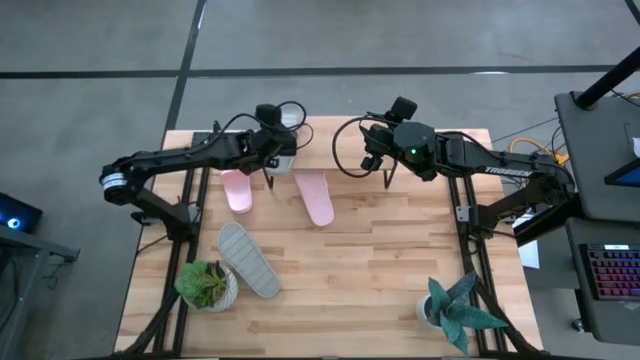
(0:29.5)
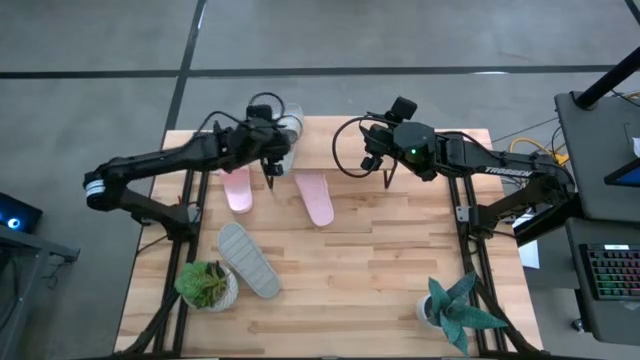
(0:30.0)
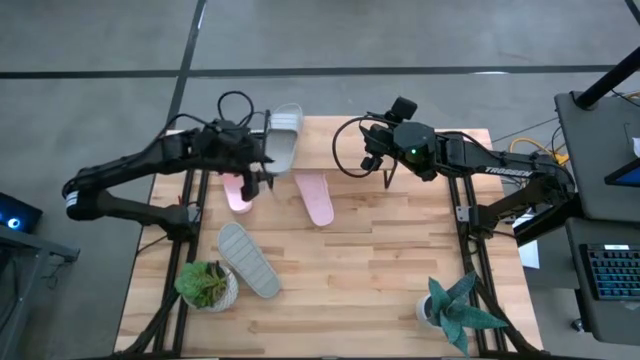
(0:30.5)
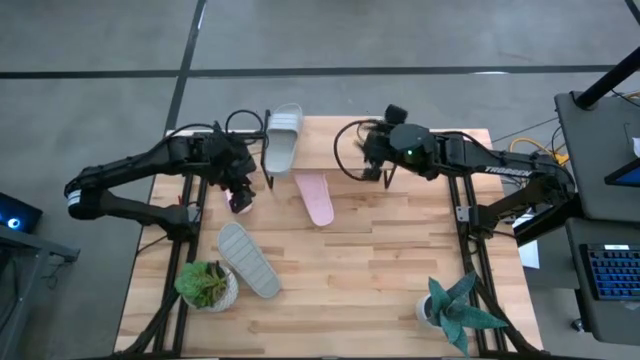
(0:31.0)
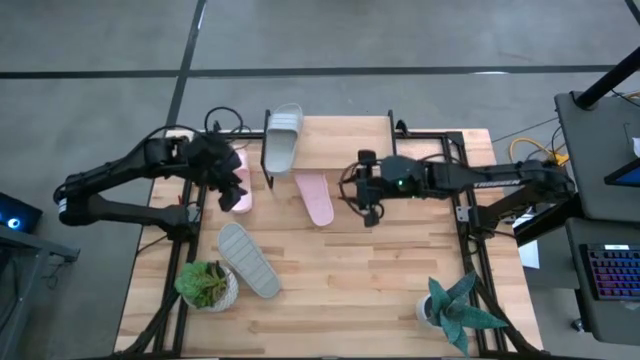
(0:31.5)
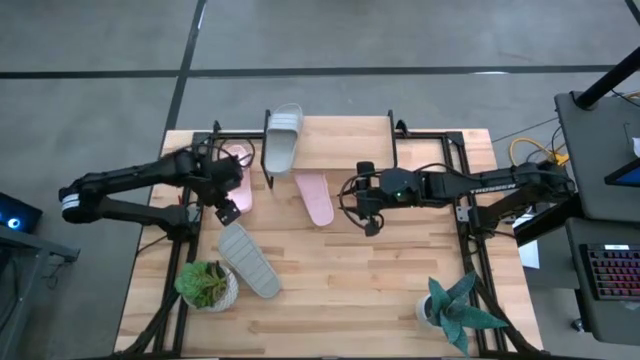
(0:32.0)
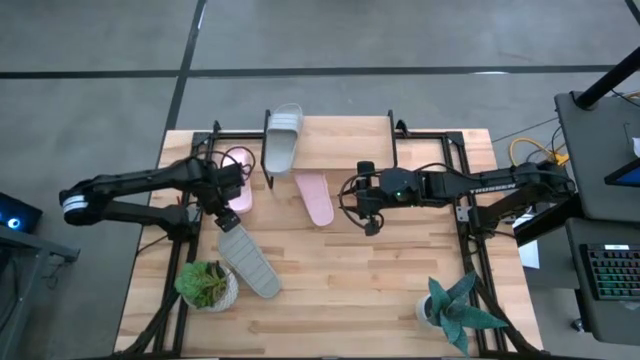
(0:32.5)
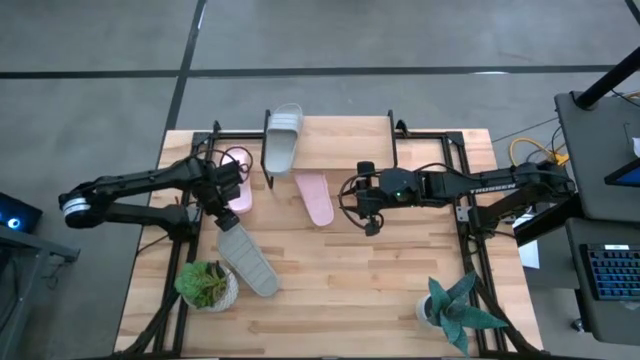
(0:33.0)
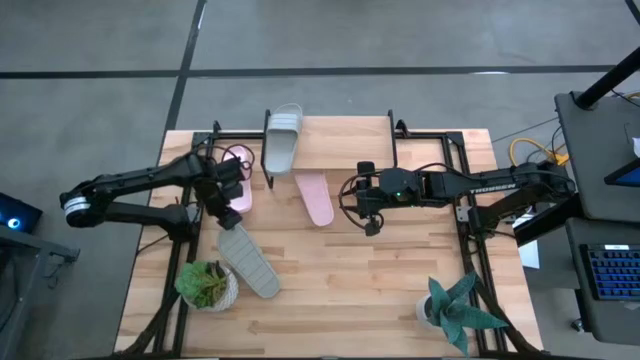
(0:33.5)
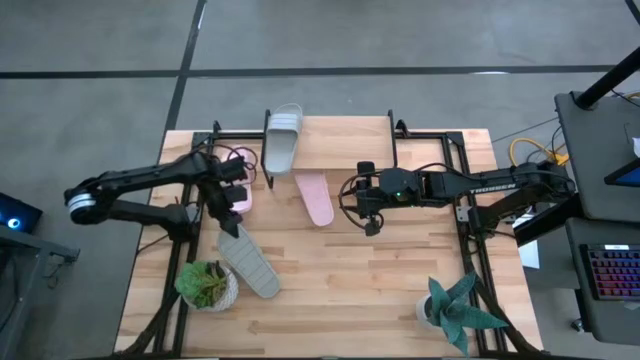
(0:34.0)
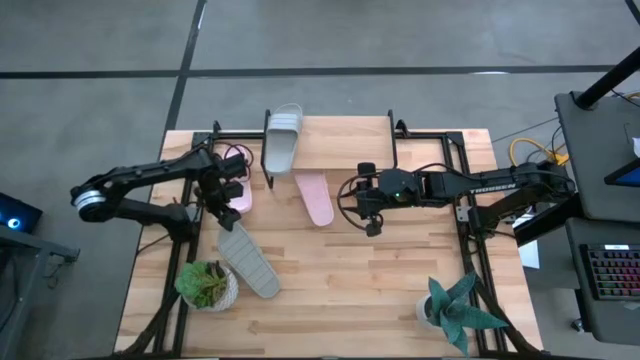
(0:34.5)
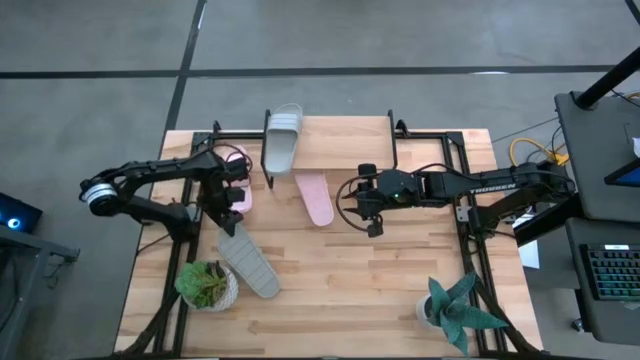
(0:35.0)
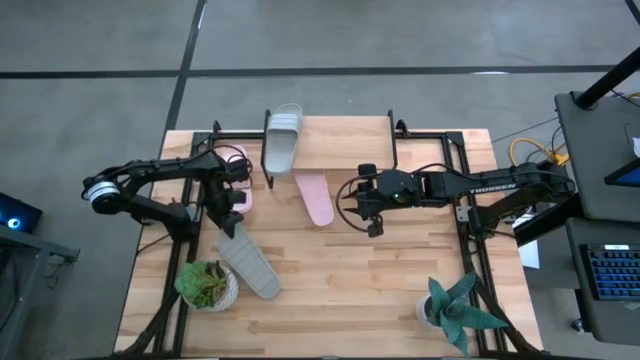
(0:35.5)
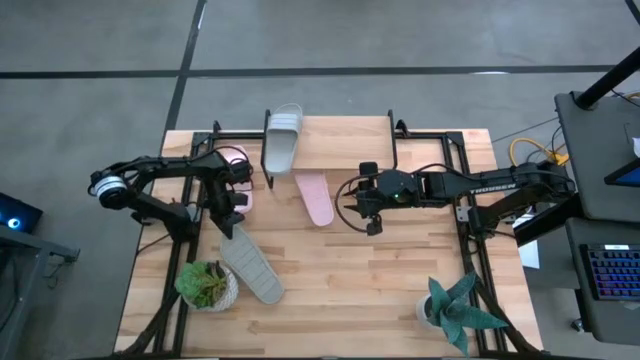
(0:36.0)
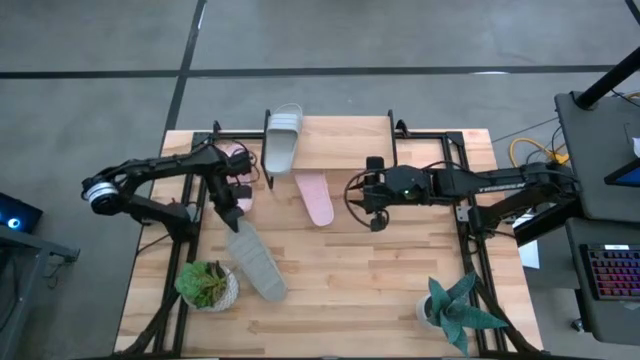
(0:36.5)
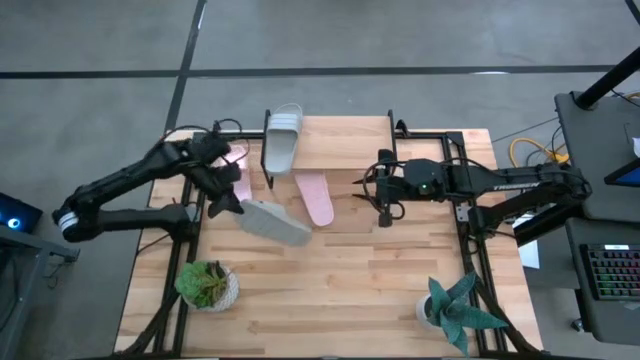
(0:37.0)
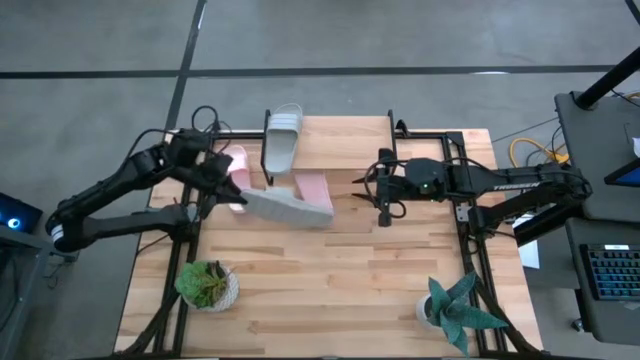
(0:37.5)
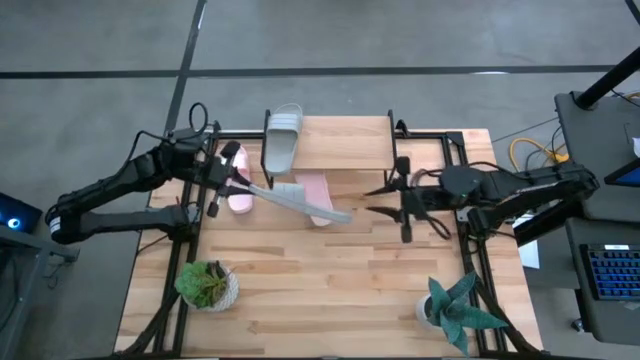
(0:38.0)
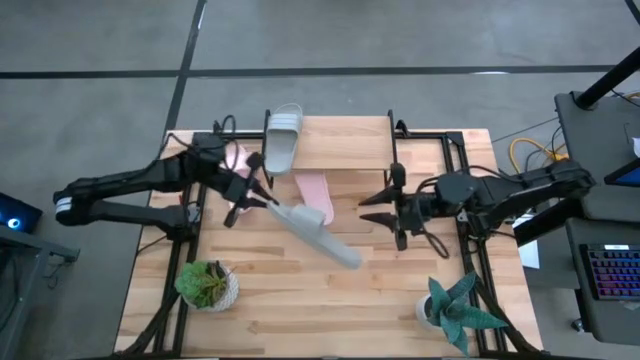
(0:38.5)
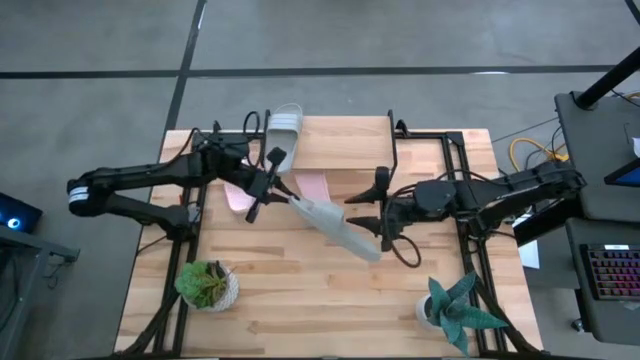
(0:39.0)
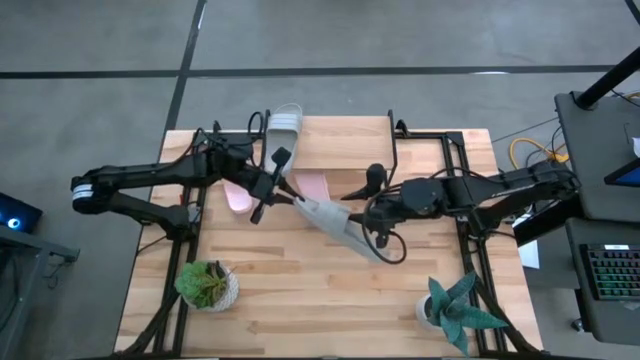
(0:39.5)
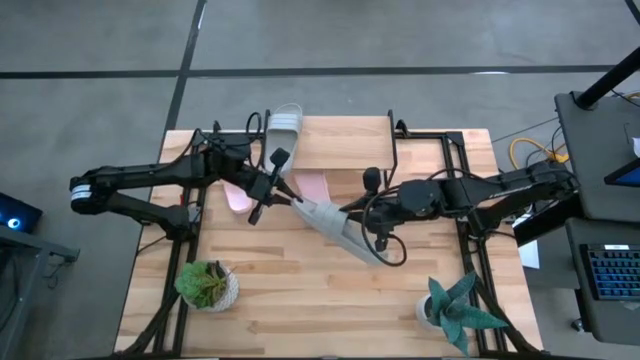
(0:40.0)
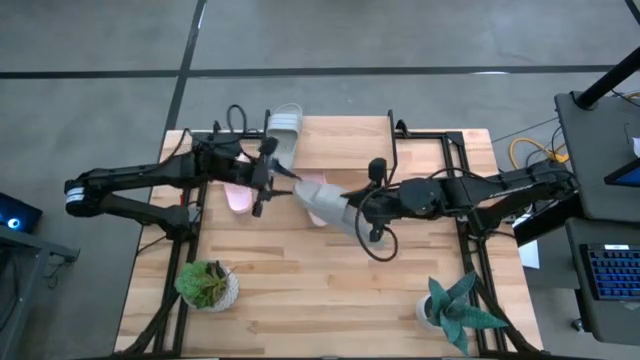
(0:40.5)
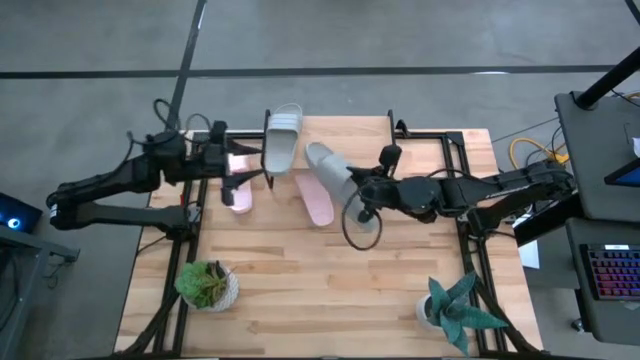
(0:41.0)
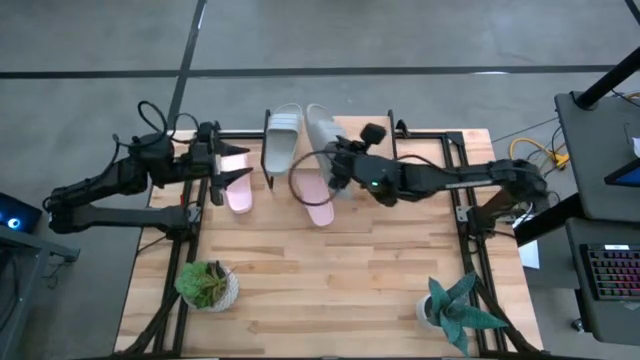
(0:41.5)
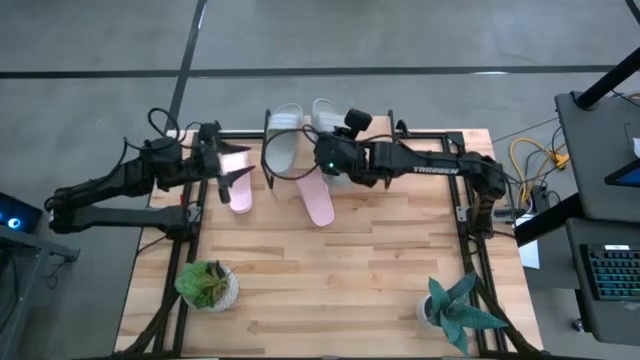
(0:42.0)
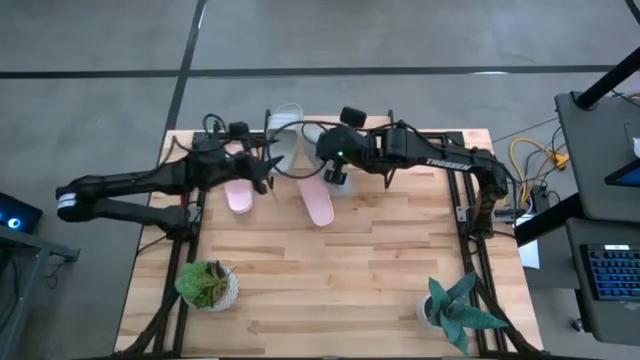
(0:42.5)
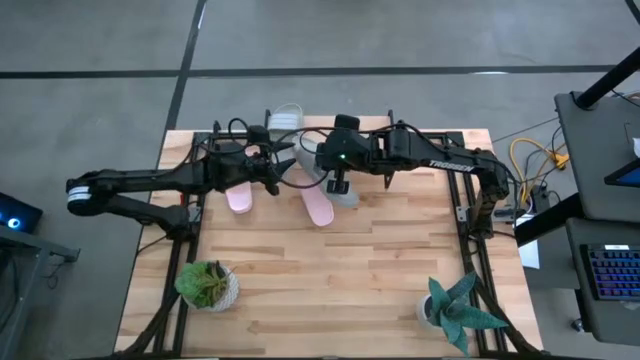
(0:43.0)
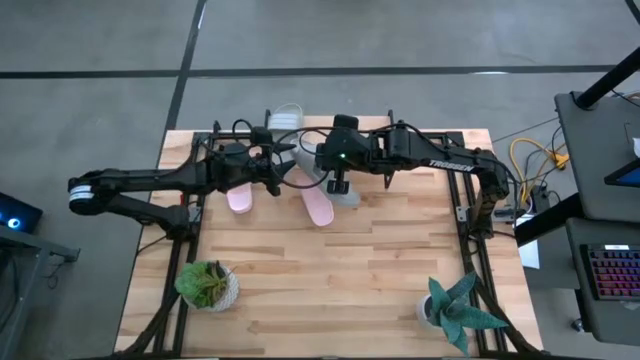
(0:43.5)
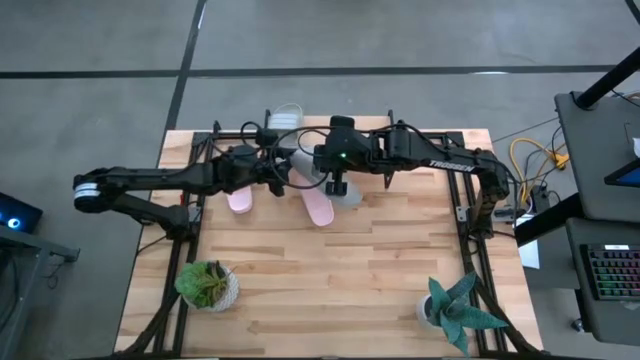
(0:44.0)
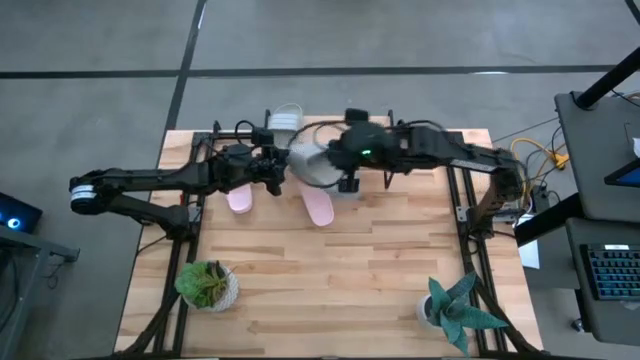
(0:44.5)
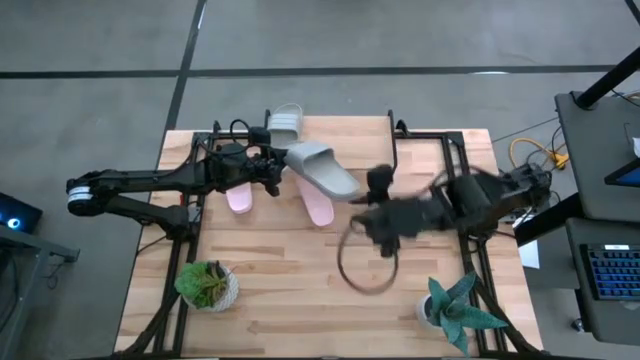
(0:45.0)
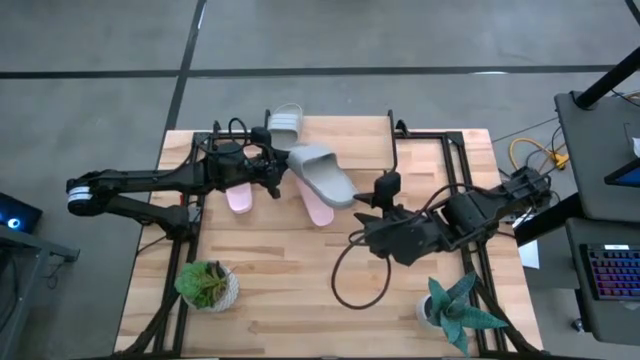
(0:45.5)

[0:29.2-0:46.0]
Task: Pick and place slides into the shelf
Put the gray slide on the shelf

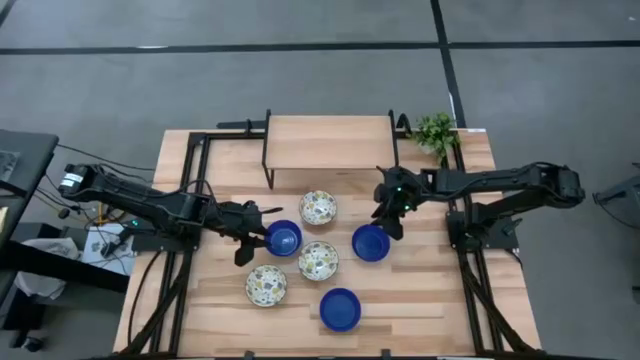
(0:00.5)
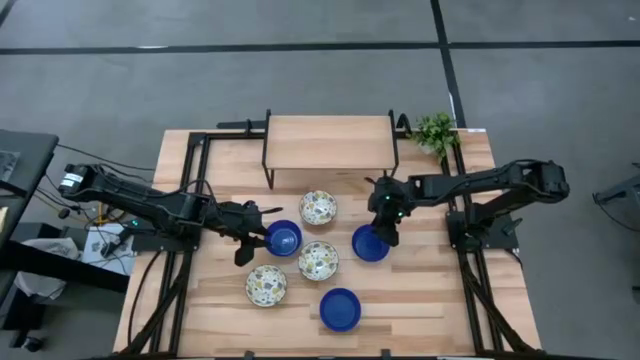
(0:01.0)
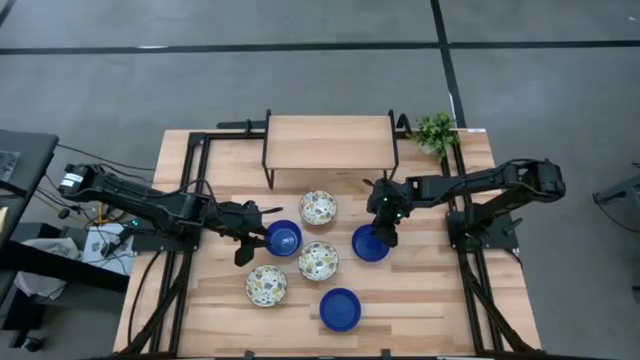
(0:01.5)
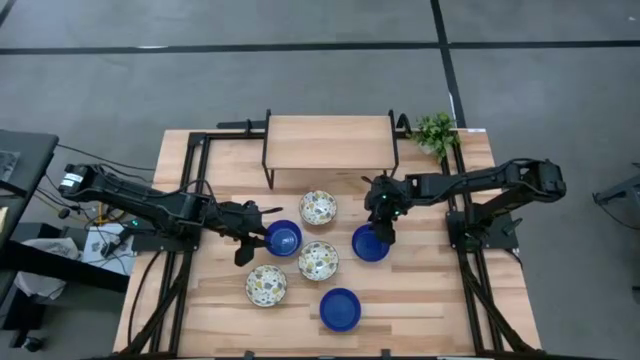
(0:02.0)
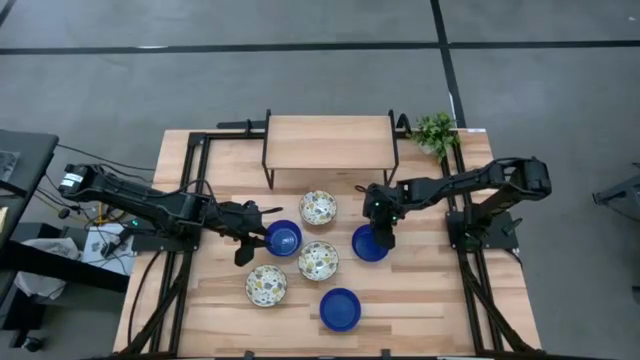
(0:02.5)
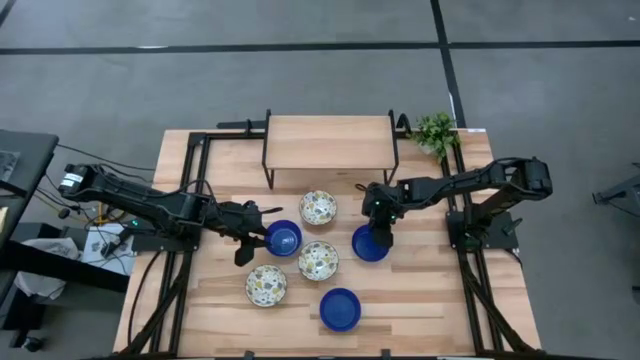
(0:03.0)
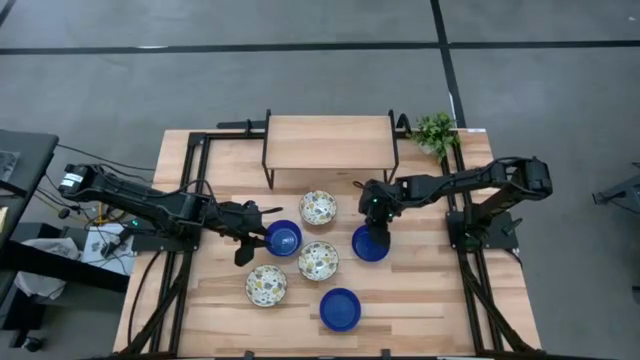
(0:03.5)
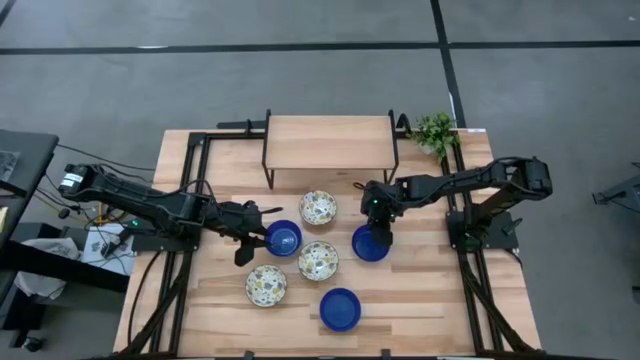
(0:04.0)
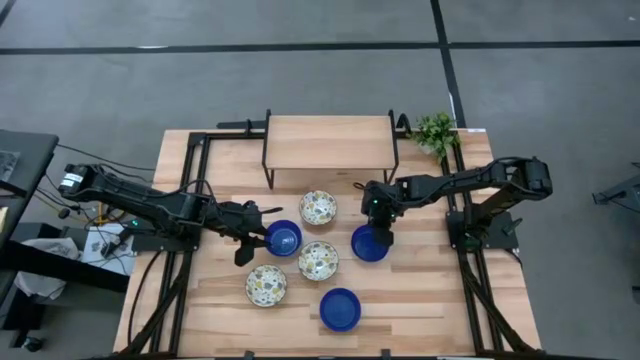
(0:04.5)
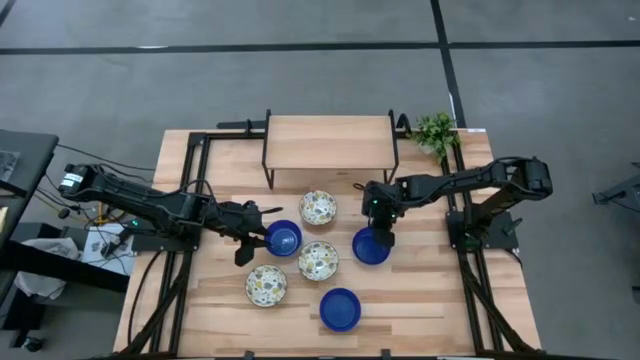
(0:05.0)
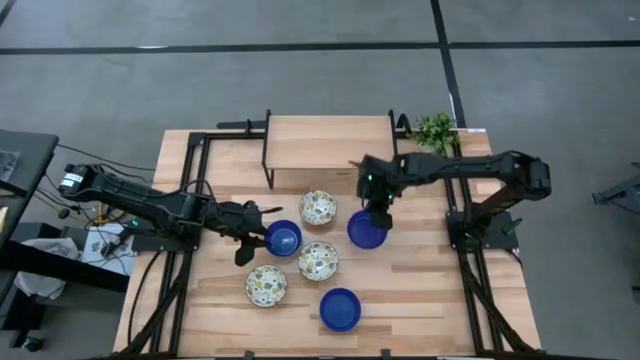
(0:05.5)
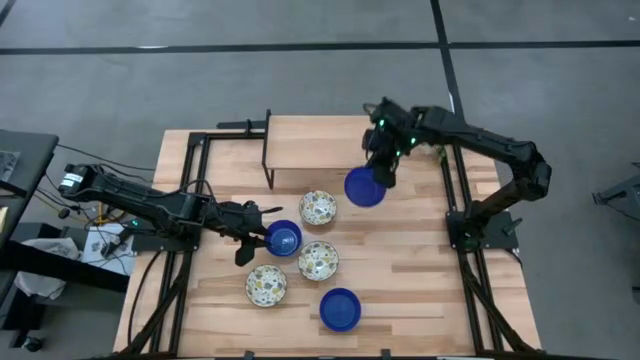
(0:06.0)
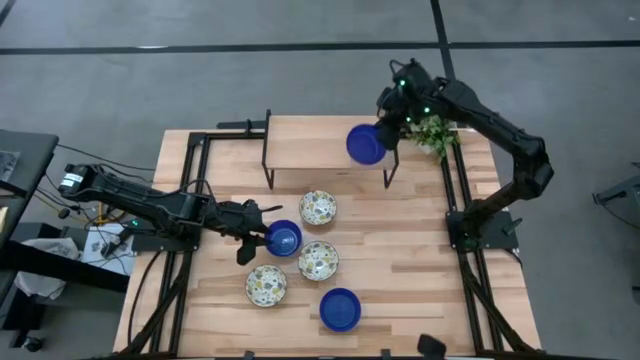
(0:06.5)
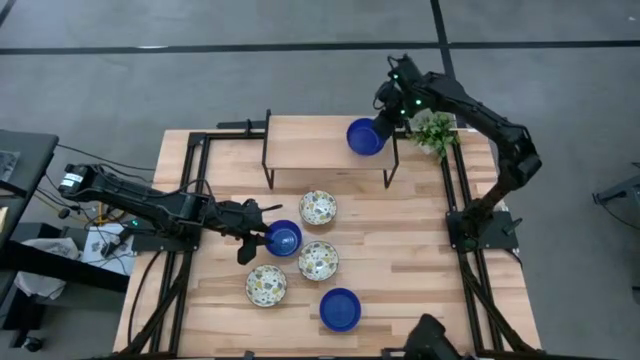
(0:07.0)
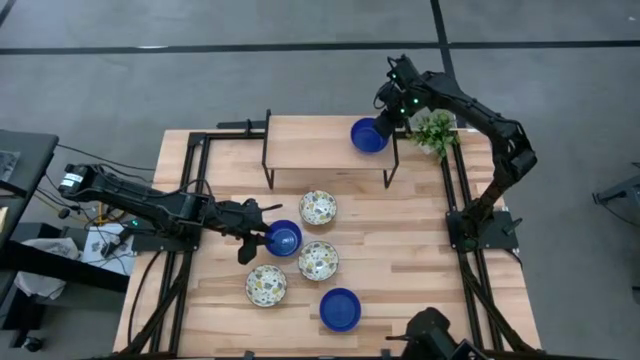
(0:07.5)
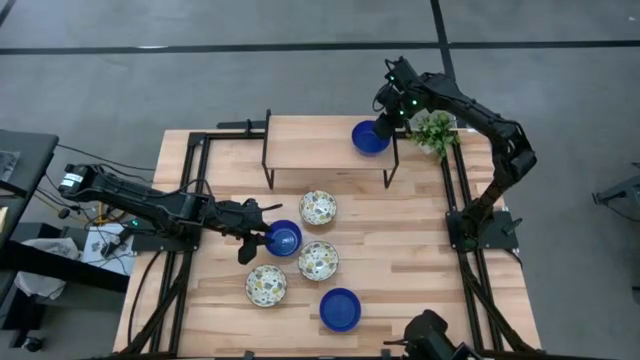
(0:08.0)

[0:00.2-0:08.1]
Task: Pick & Place Mini bowls
Put the top right blue bowl on the shelf
